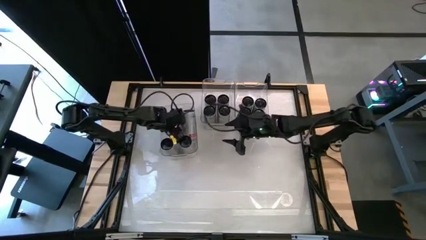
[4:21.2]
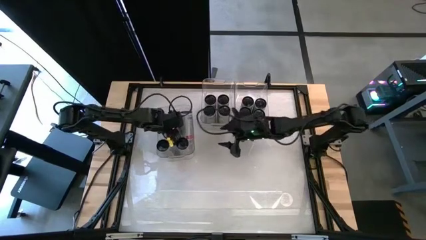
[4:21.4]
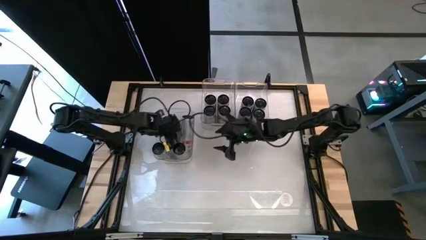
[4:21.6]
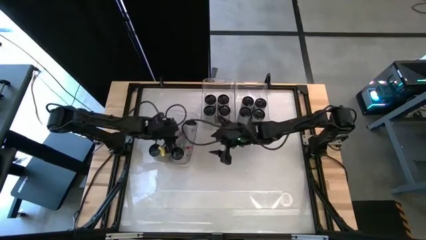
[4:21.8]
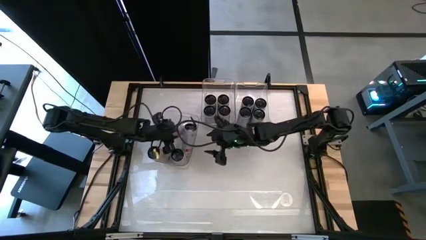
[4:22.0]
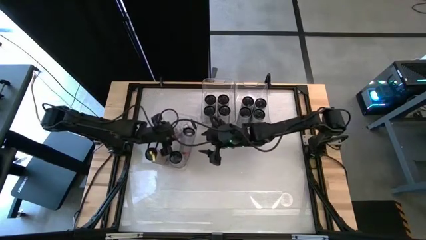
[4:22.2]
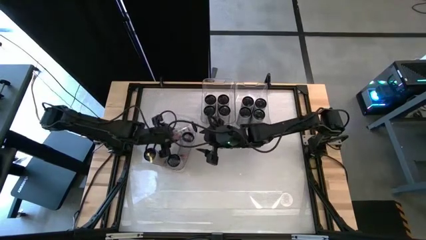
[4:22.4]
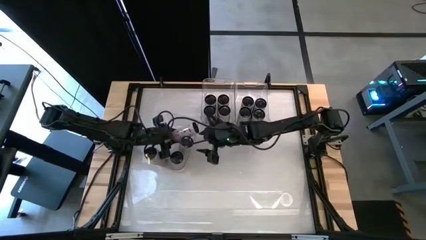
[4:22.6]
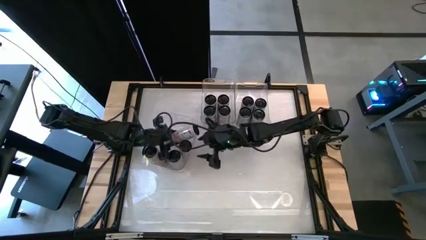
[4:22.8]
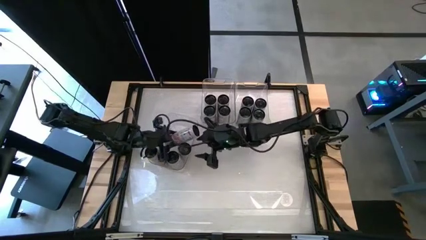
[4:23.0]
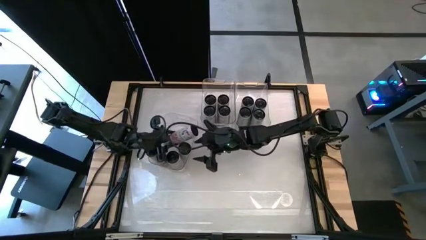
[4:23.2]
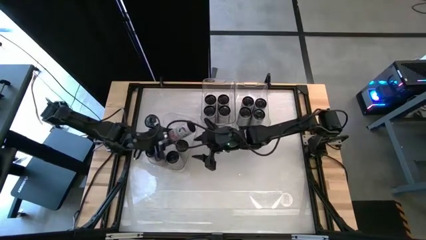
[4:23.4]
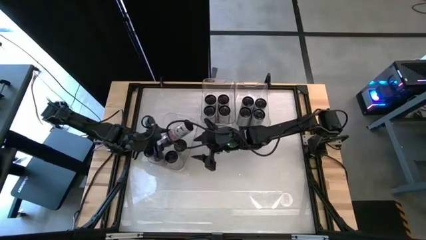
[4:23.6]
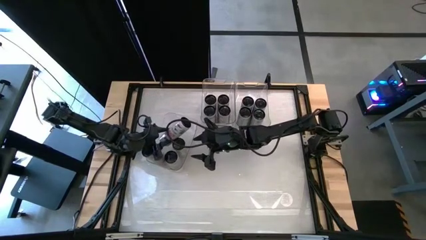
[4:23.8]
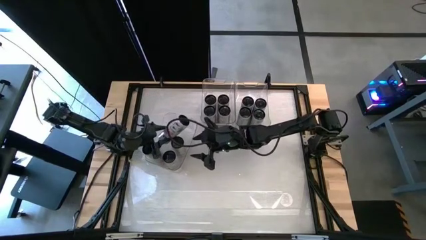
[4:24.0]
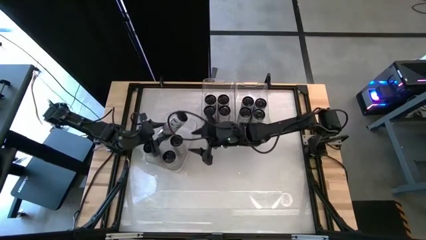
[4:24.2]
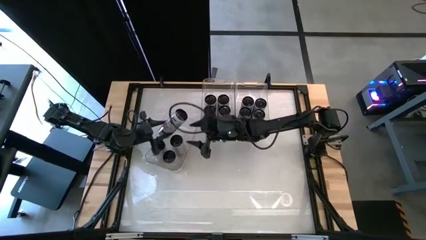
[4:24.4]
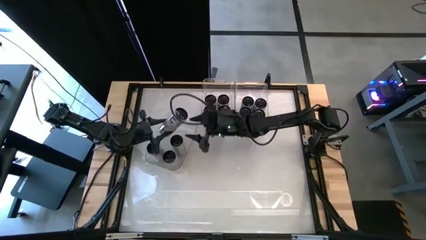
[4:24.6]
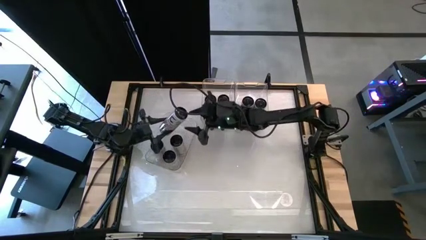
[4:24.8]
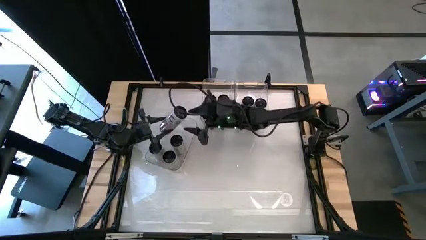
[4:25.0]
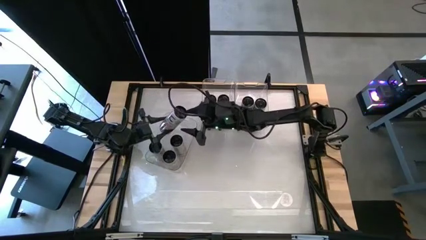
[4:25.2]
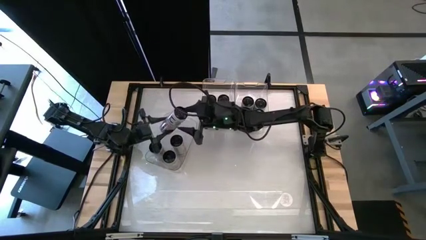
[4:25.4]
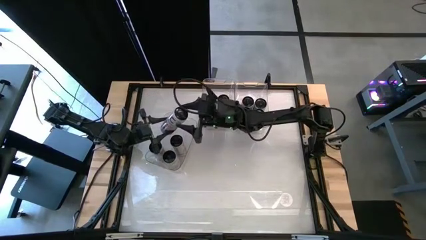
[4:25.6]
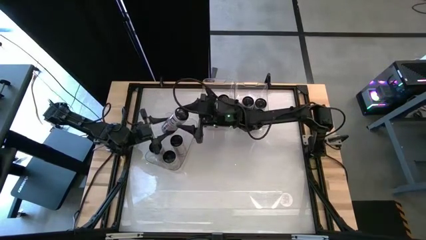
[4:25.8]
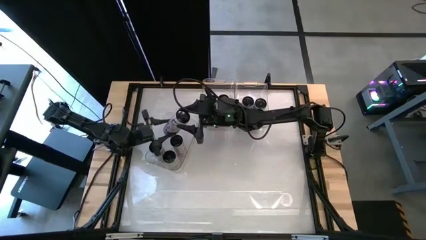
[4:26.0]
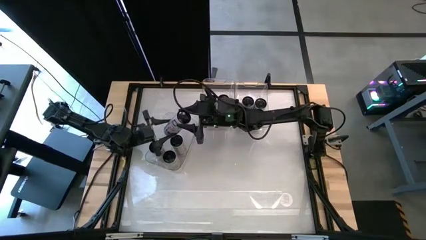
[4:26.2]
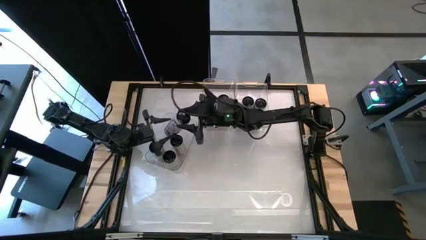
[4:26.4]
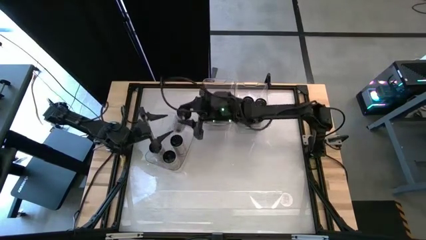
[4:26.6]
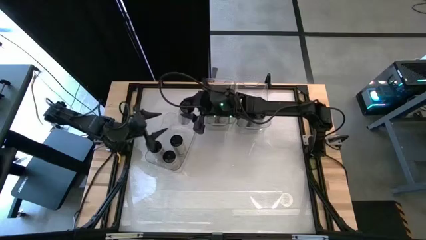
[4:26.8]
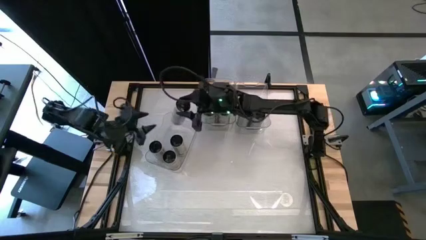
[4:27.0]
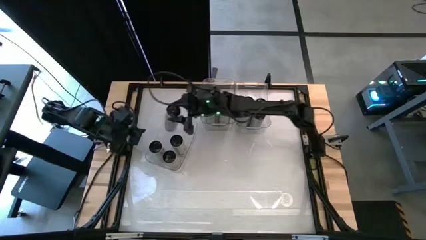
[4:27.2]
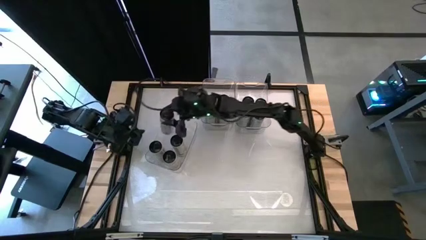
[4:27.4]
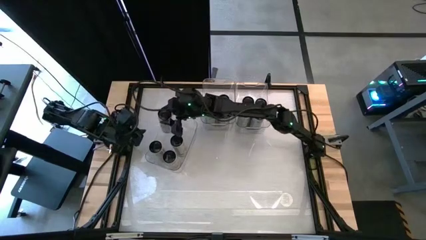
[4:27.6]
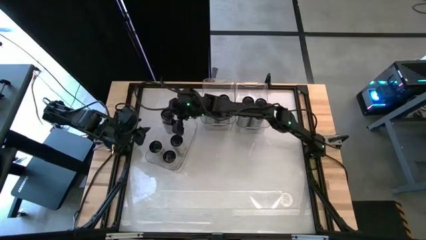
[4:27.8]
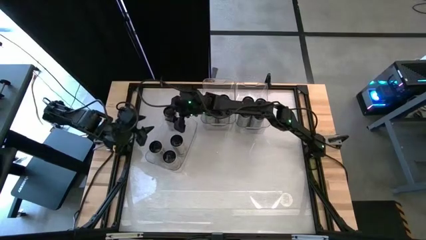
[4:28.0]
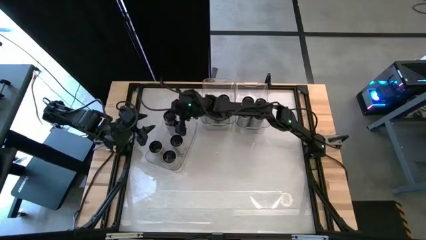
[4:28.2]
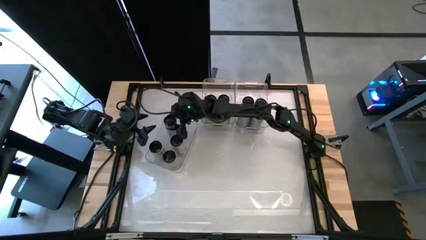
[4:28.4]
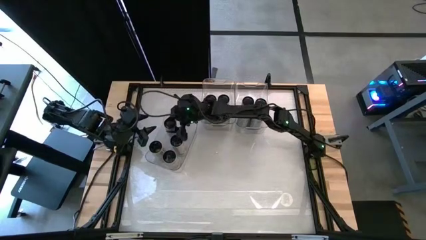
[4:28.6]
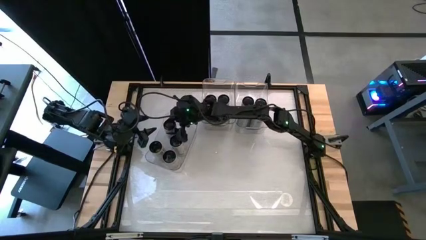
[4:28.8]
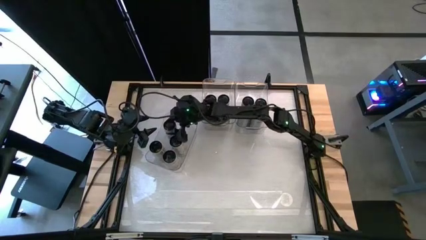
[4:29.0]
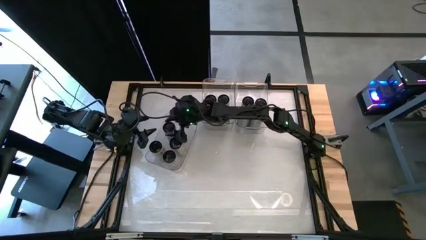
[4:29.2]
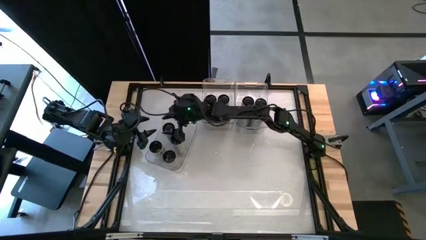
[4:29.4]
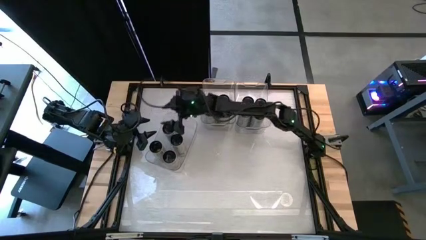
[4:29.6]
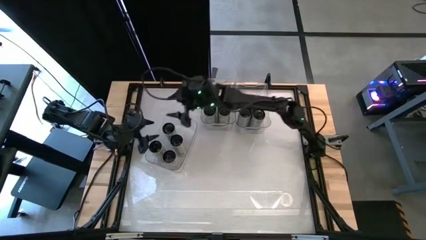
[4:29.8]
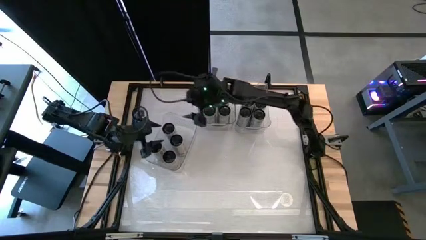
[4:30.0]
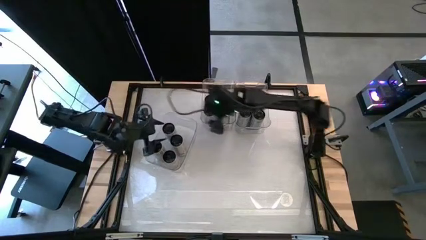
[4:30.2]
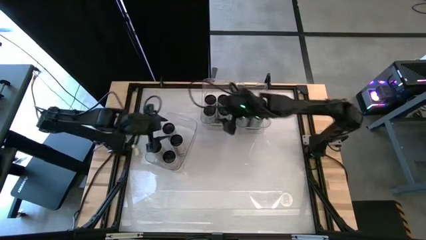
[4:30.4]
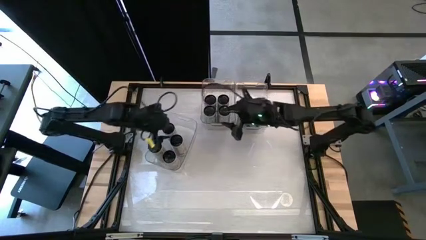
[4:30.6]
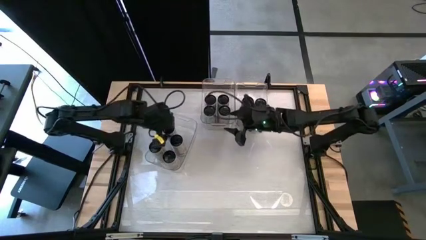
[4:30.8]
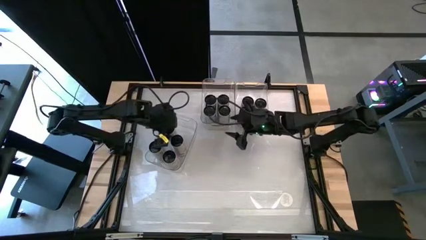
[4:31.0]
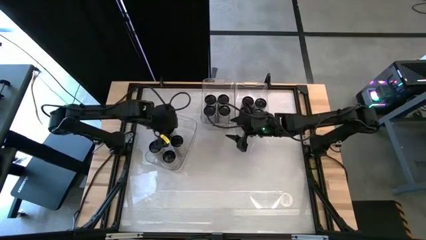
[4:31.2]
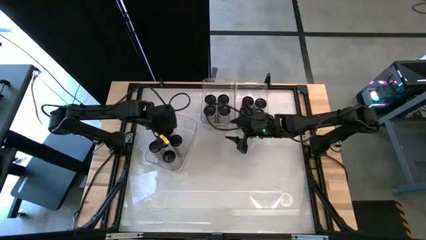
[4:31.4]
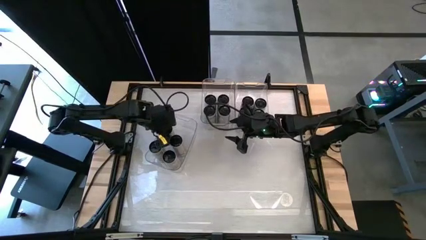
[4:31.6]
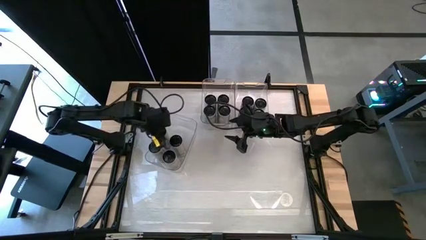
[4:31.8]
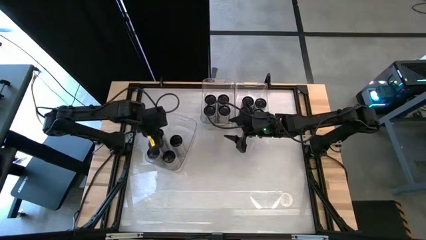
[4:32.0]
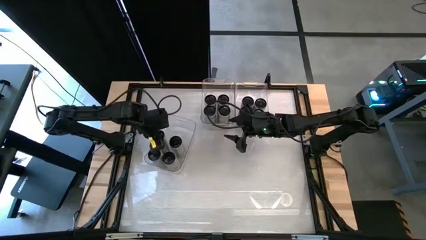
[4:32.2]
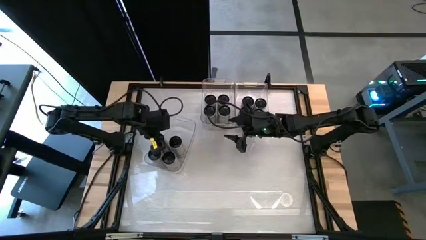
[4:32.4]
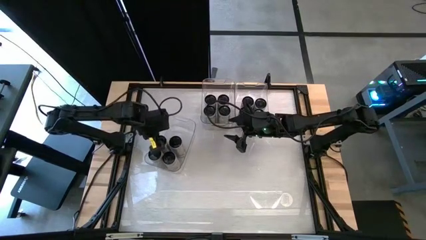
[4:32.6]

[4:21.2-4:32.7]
Task: Sort soda cans
Adjust the white pink soda cans

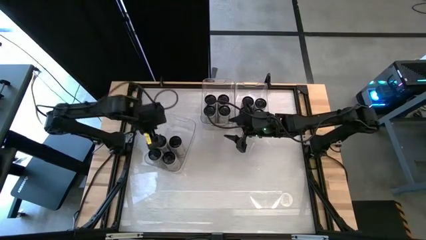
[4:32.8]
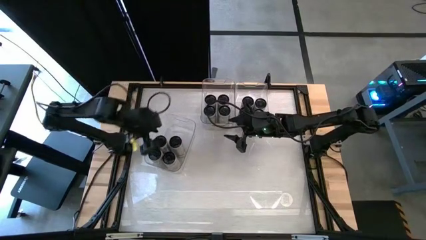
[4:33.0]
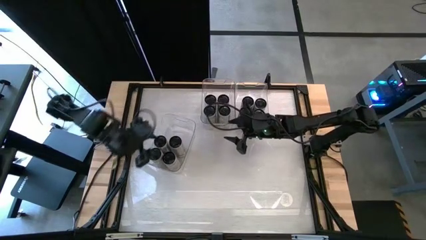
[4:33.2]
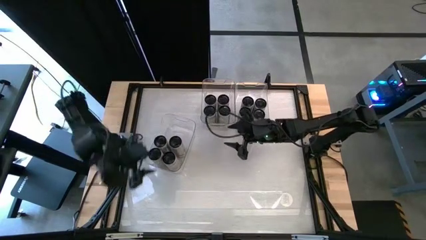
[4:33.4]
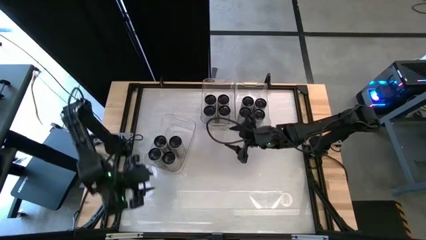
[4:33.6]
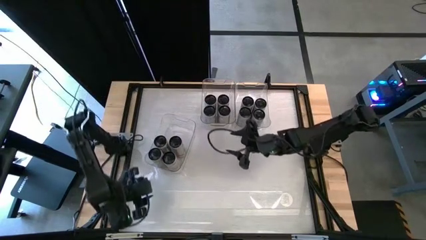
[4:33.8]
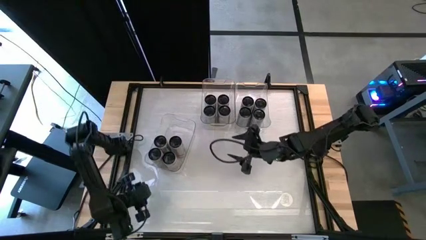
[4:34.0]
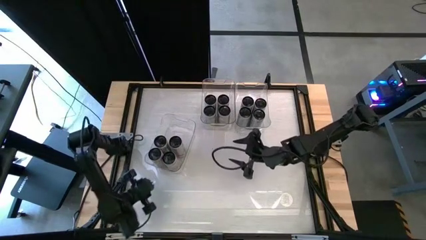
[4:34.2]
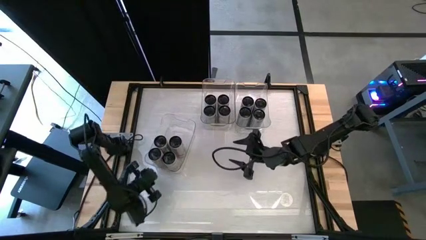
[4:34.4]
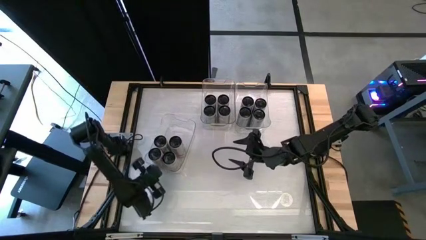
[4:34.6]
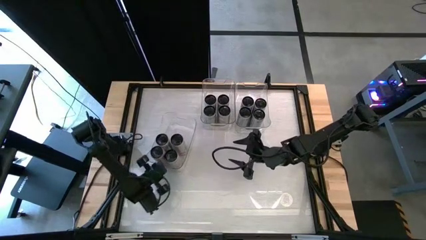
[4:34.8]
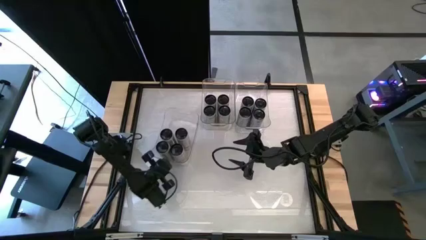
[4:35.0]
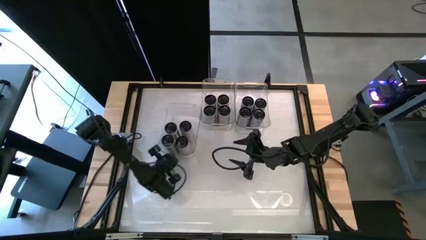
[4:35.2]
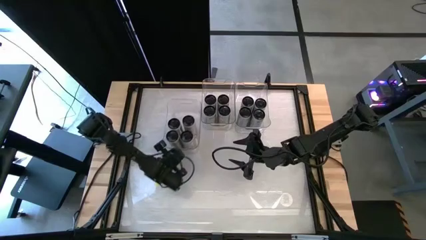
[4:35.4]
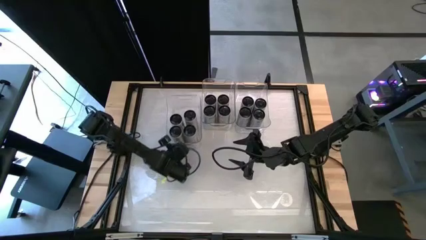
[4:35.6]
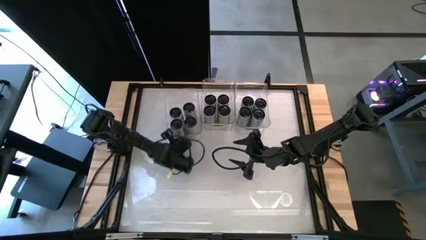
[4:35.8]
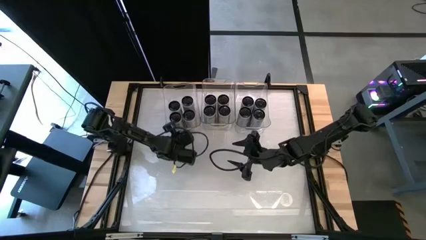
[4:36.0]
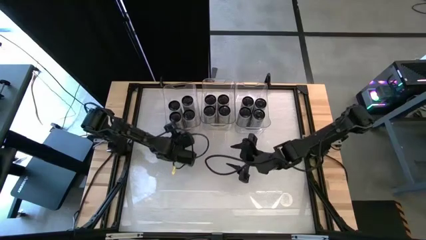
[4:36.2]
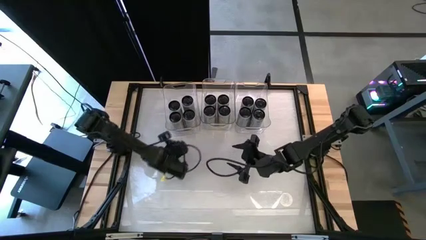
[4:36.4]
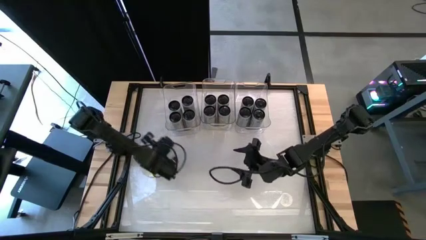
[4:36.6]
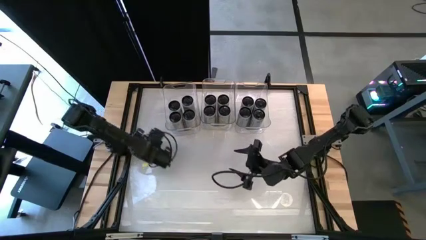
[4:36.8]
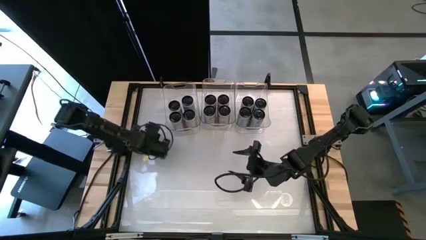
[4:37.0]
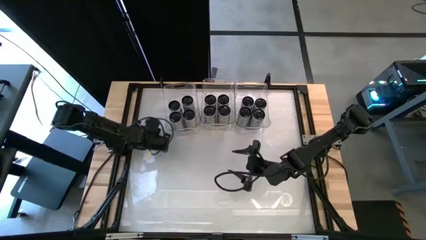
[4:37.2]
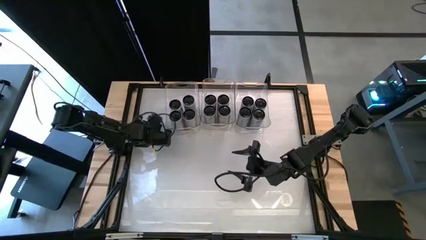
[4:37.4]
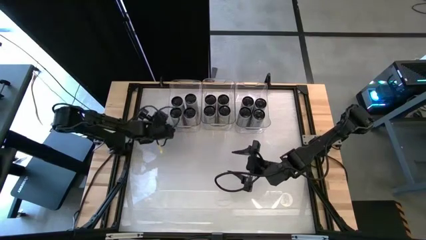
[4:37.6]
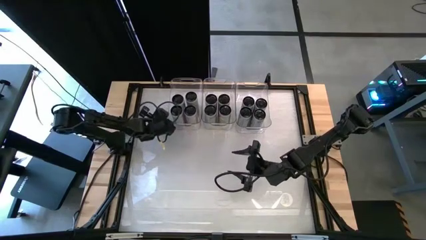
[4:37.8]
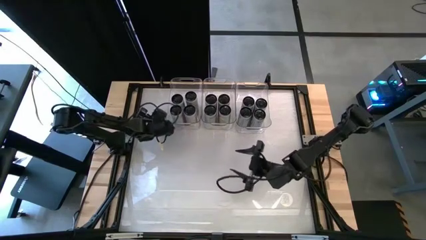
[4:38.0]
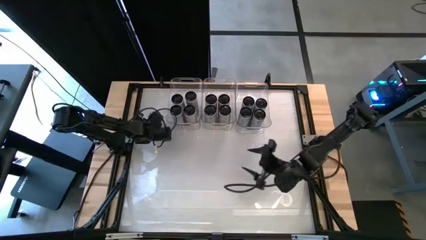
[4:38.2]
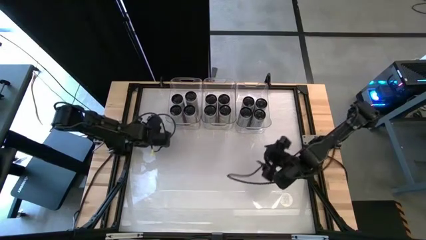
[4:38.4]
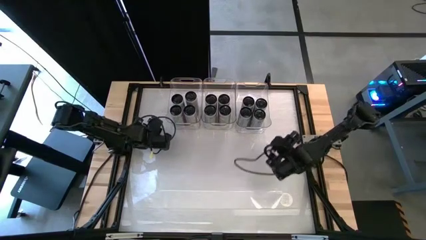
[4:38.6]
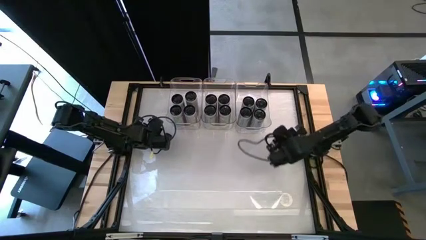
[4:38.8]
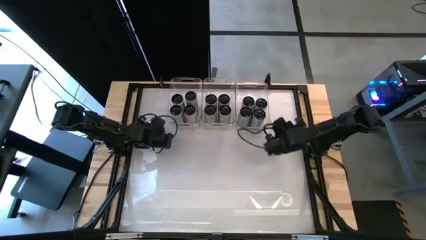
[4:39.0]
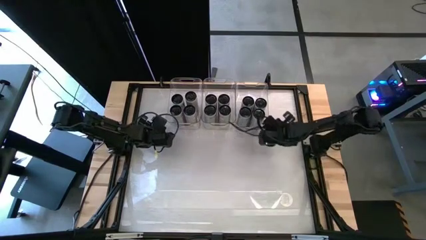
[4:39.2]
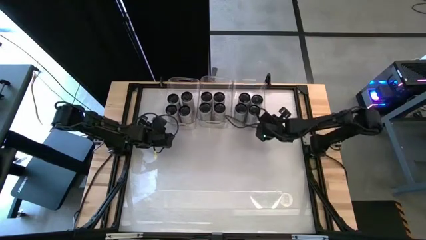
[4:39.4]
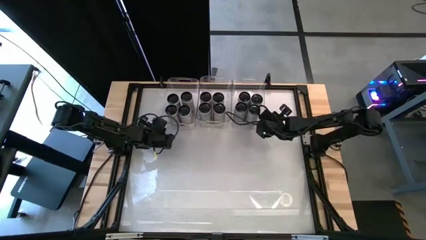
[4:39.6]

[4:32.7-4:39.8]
Move the bottom left transparent bin to the left side of the top middle transparent bin
